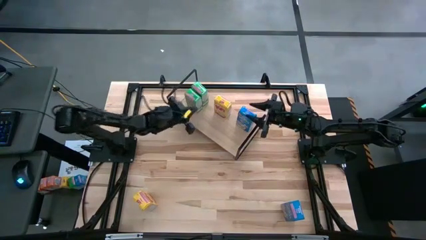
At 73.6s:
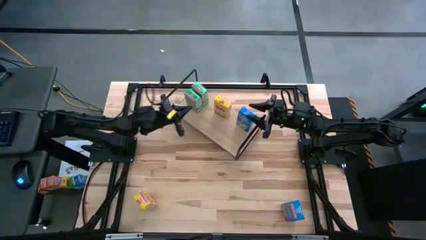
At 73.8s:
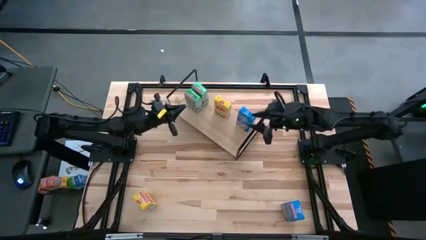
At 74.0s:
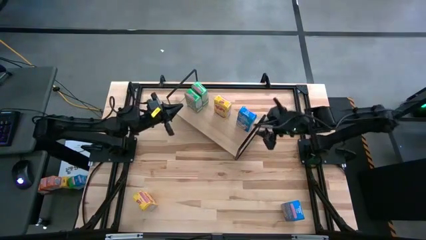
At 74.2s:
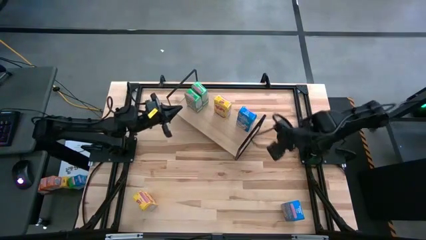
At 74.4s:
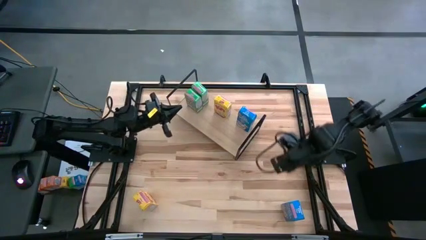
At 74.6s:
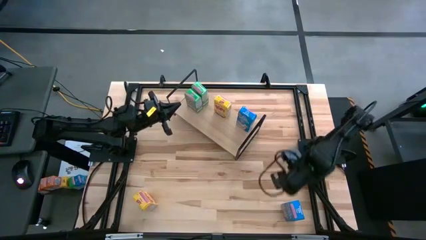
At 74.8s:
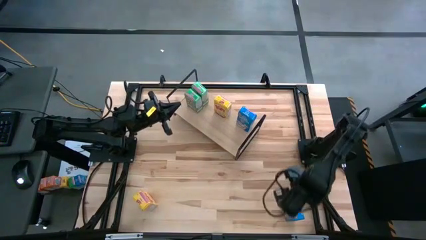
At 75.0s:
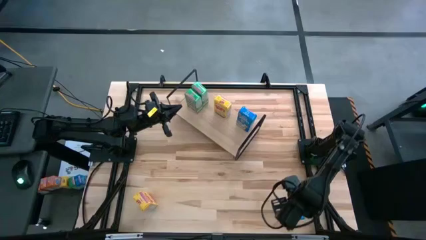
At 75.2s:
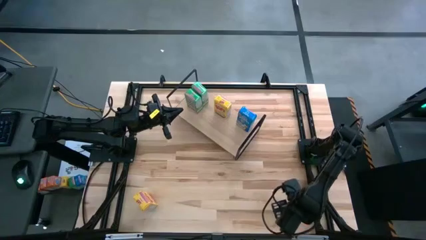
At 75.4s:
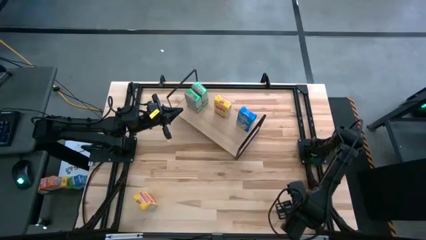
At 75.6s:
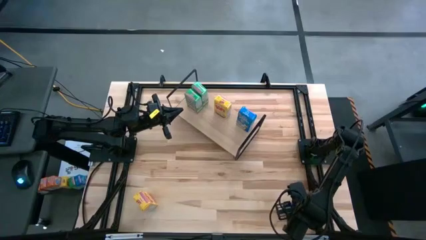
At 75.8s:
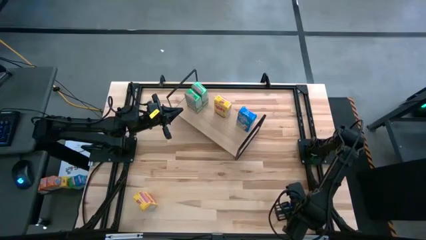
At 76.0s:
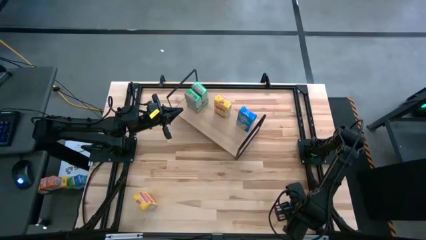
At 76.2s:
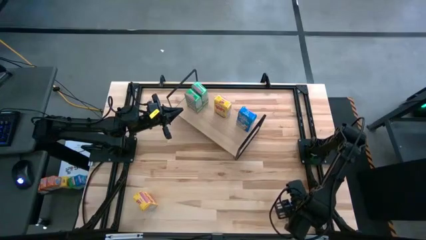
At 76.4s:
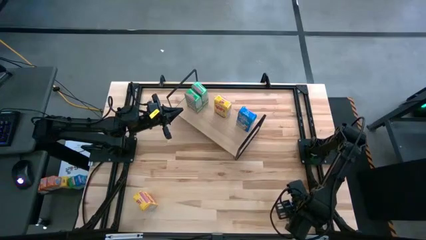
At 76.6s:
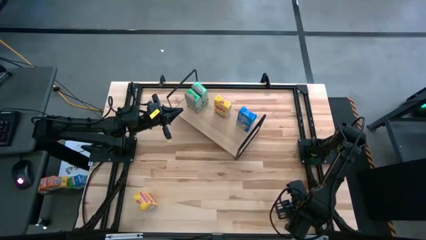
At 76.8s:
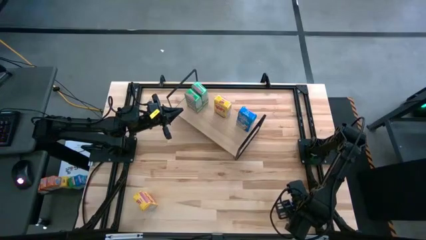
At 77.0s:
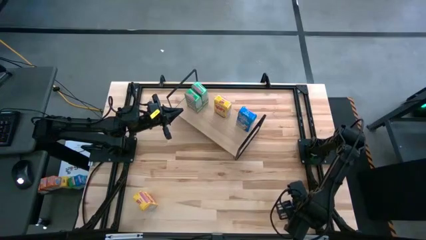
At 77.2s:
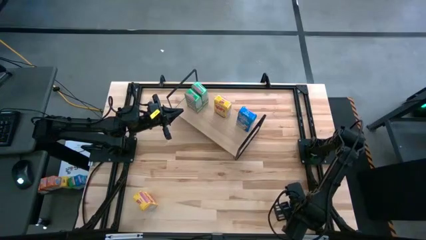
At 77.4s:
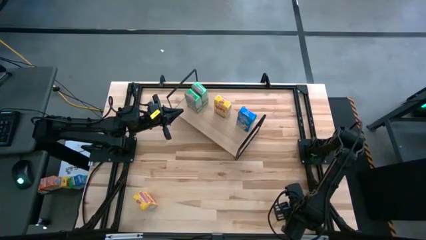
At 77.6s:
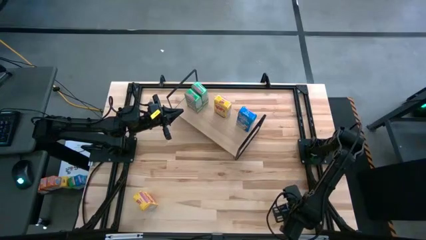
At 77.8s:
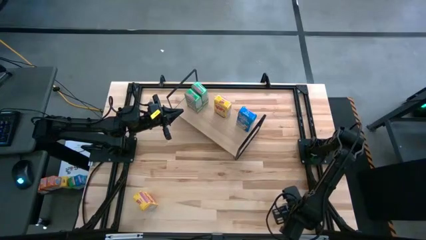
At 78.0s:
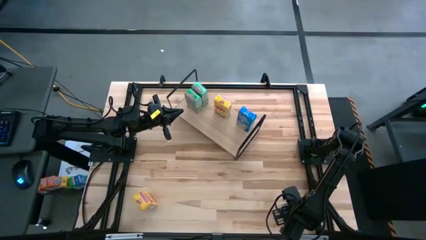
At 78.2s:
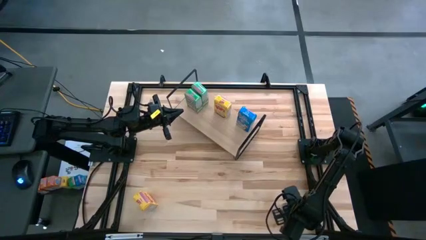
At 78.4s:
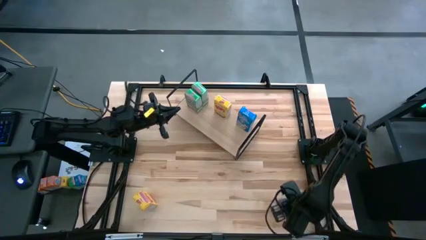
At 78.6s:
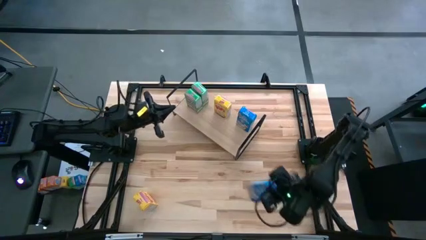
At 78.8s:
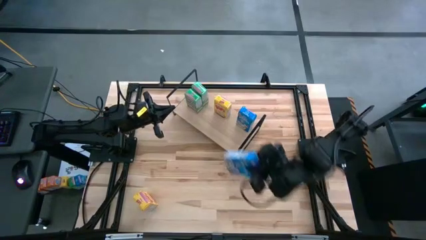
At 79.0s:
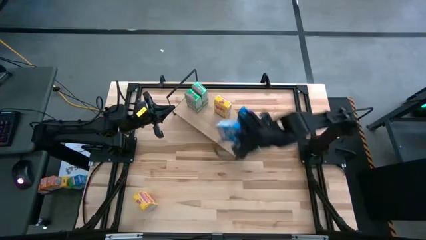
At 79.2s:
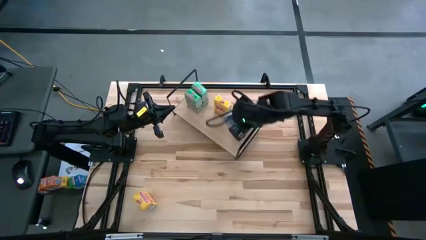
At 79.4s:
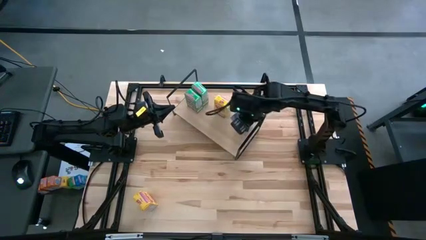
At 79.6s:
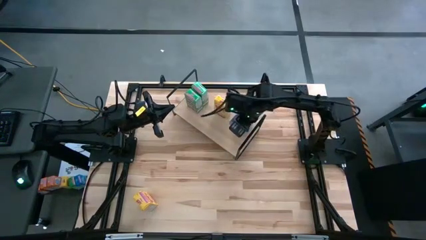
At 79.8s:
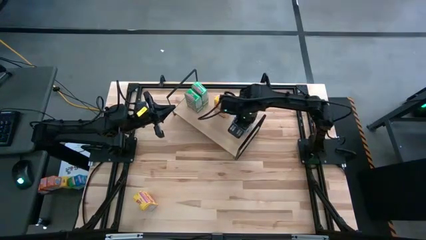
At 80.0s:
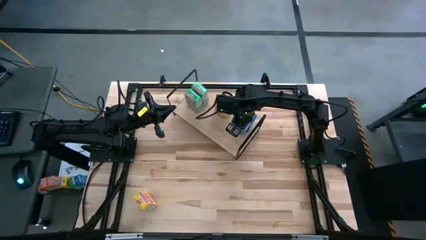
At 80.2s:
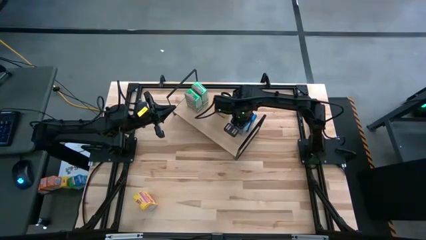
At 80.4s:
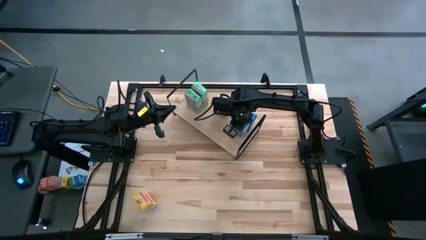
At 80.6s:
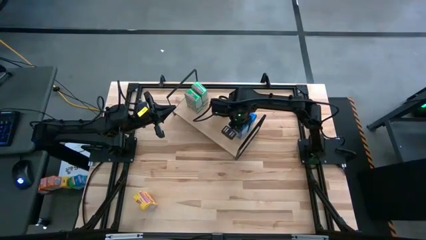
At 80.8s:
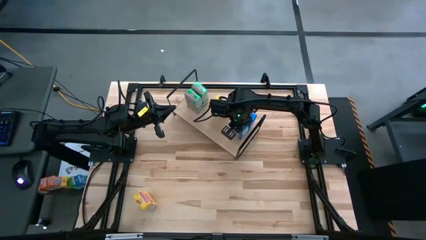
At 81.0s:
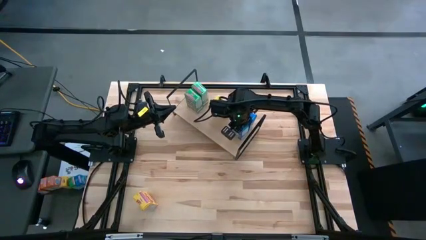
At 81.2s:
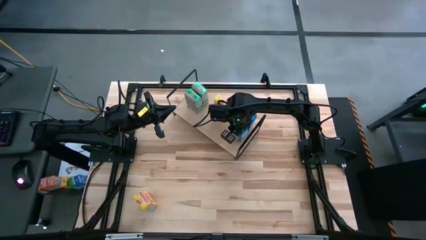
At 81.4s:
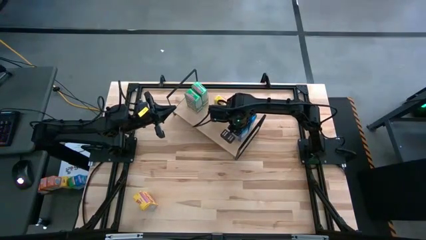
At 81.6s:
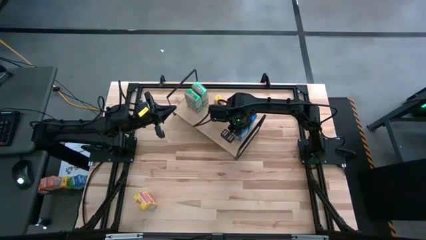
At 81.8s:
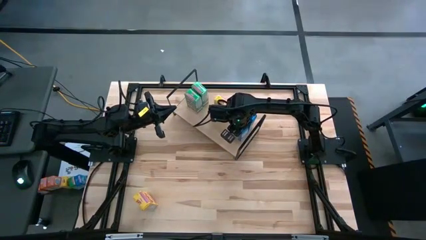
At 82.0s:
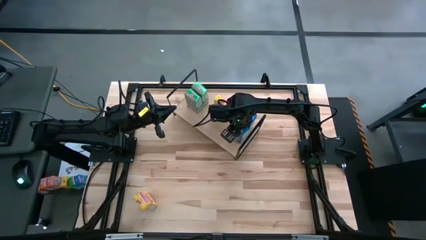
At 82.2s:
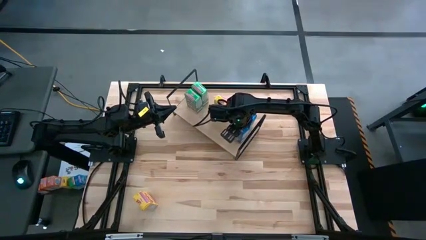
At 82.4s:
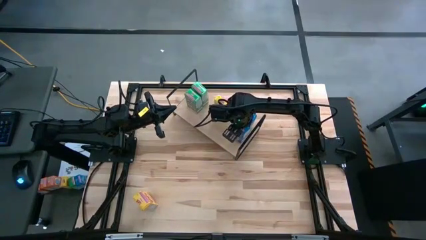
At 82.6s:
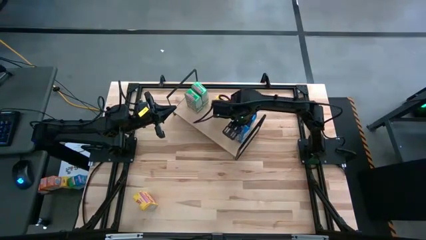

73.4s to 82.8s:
Task: Stack cereal on shelf
Put the blue cereal box on the shelf aligned with the other blue cereal box

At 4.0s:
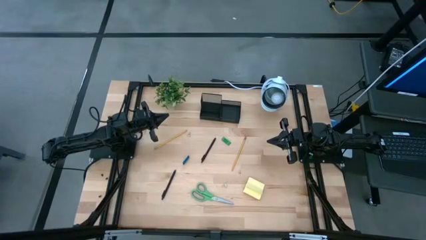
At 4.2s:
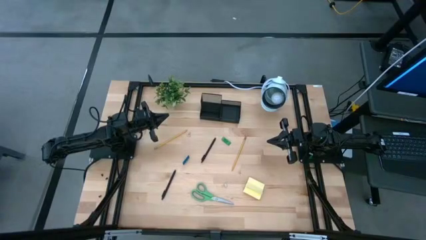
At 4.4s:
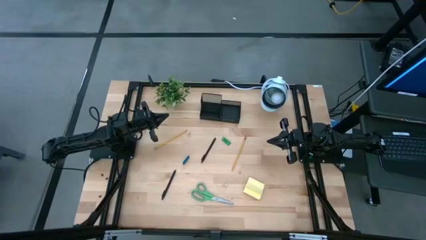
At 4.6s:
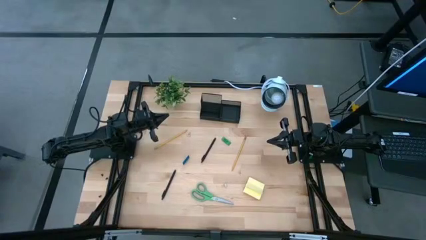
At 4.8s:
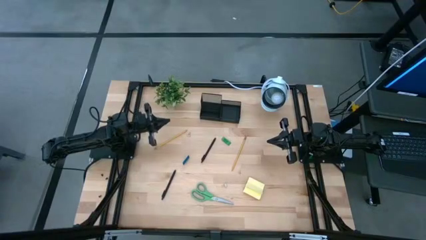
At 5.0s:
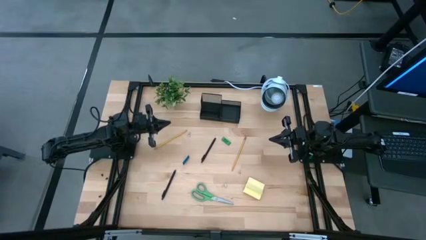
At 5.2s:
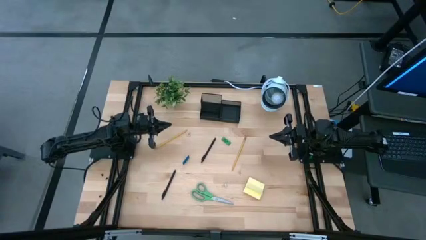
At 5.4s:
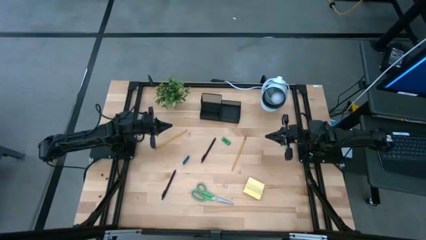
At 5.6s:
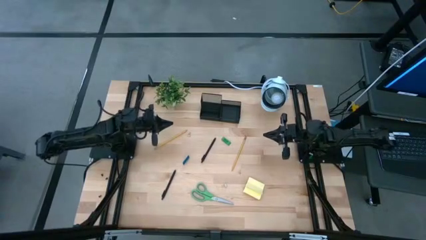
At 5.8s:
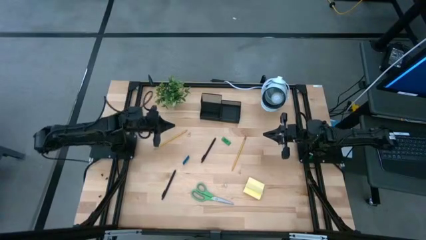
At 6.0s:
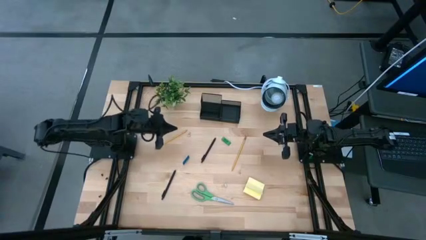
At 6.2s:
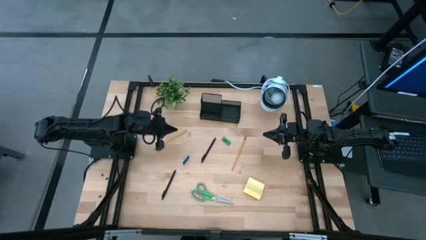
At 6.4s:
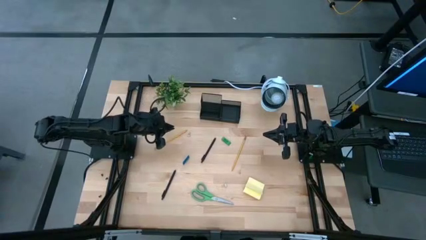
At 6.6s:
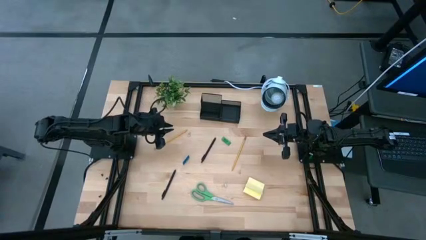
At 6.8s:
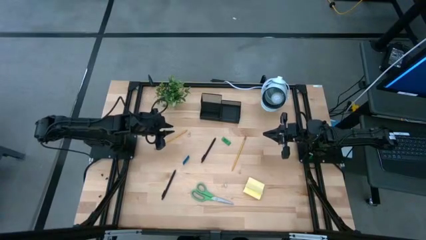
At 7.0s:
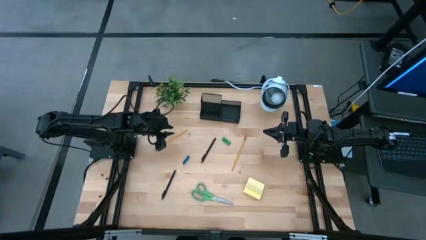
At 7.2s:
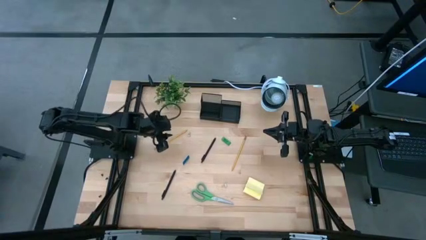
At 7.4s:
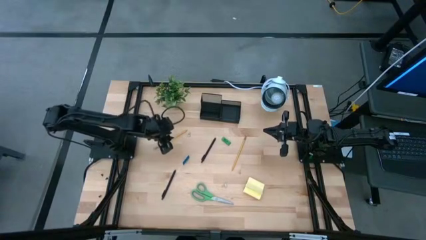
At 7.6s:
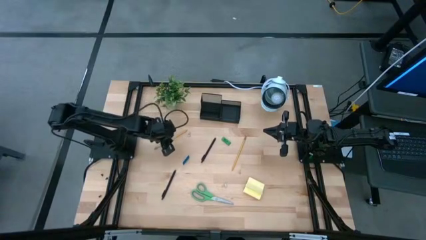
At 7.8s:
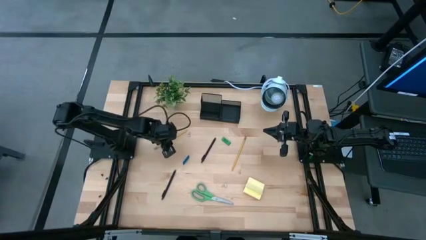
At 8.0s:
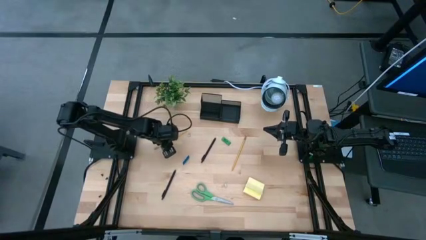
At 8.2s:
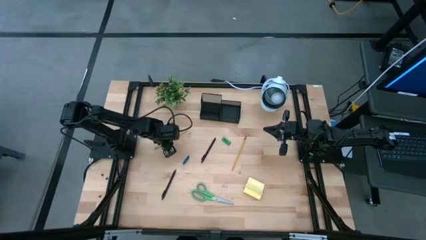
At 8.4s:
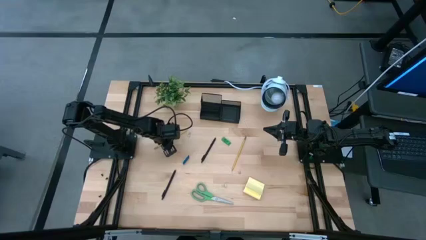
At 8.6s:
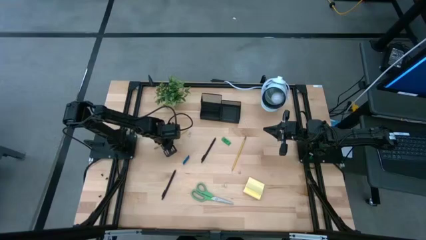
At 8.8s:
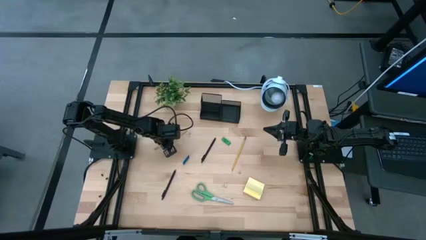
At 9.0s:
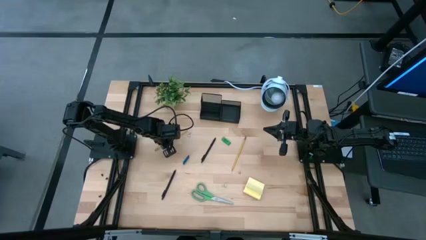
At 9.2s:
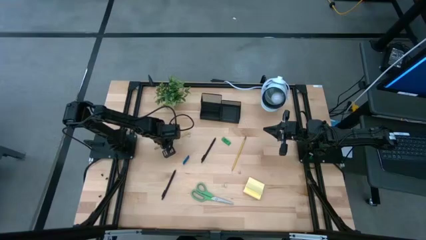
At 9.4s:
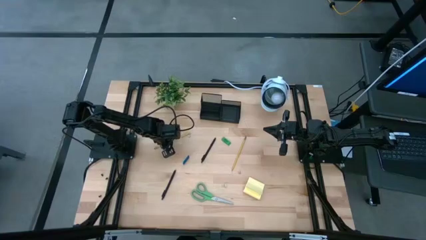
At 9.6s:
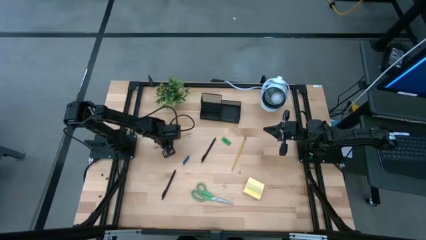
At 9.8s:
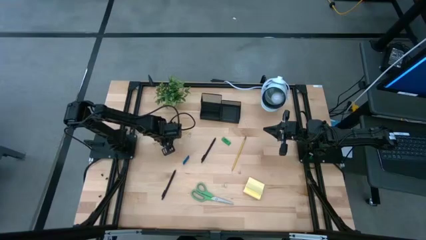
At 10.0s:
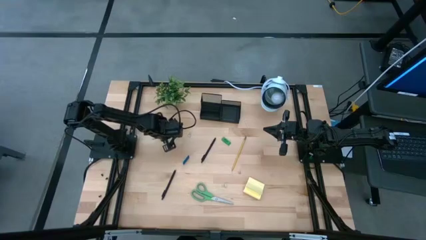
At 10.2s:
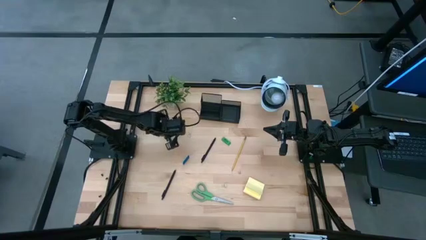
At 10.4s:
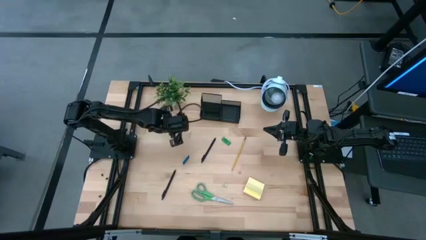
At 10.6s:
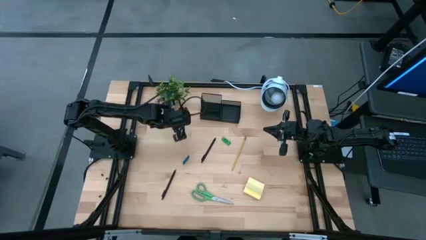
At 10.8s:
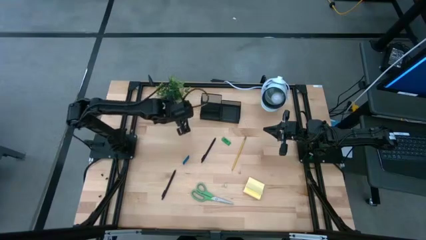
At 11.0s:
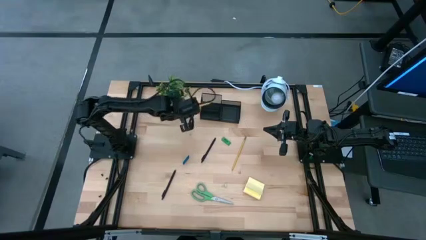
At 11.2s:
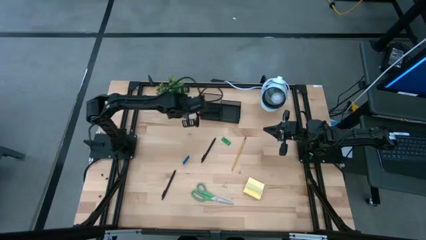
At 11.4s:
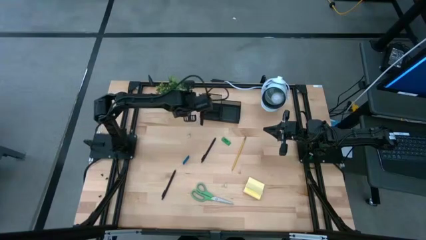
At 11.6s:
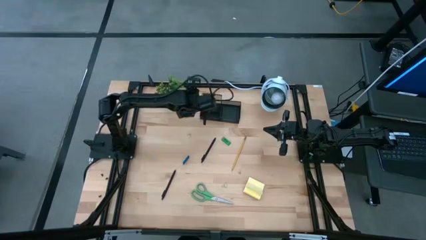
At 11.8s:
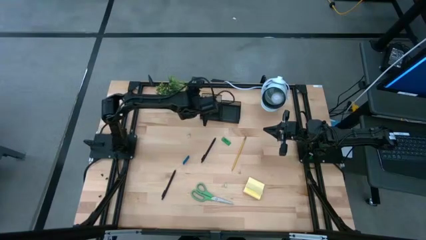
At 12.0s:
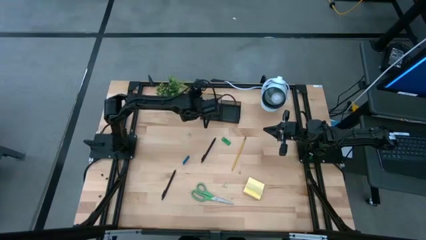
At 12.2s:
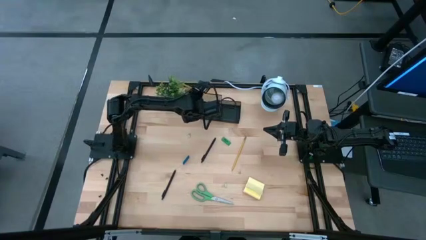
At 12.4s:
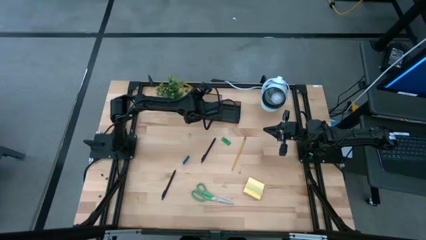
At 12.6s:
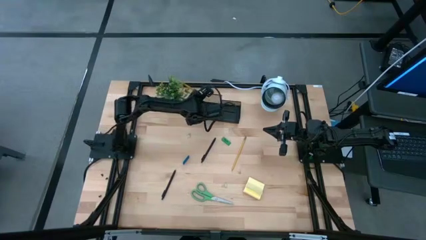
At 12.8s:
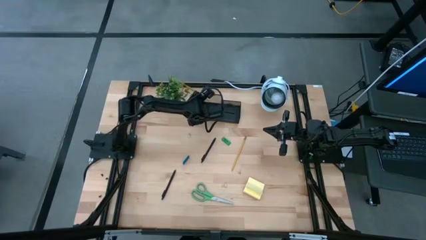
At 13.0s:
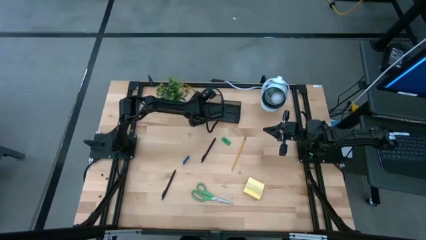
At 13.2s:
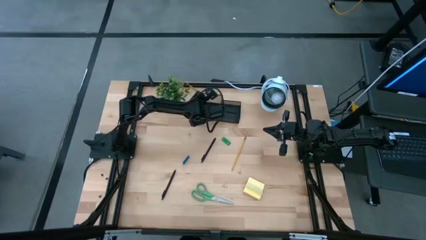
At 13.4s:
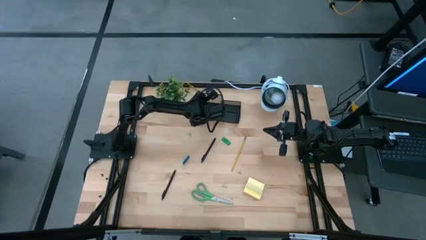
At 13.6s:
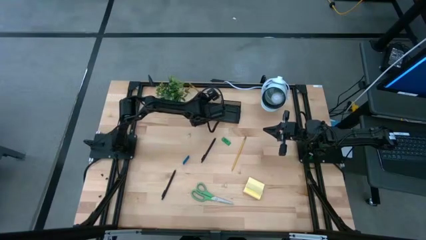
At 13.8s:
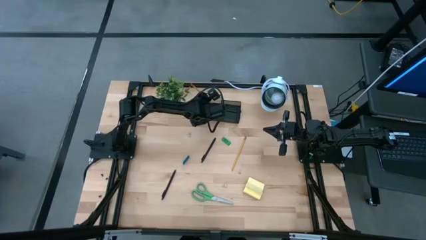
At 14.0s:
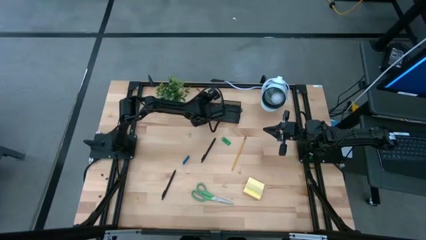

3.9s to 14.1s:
Task: Pick and place office supplies into organizer
Put the left yellow pencil into the black organizer
